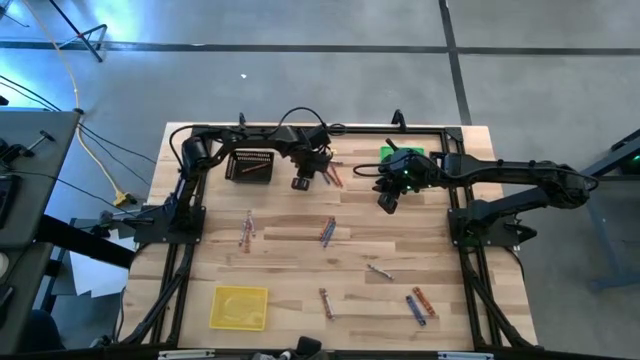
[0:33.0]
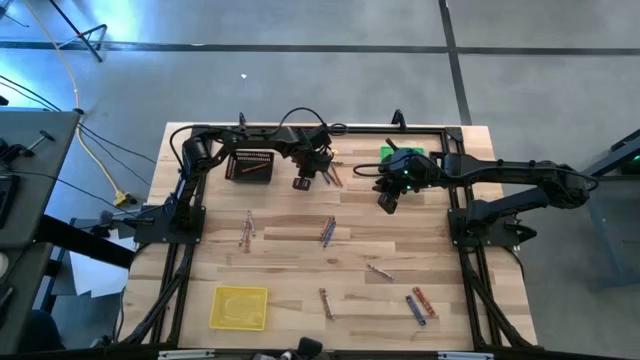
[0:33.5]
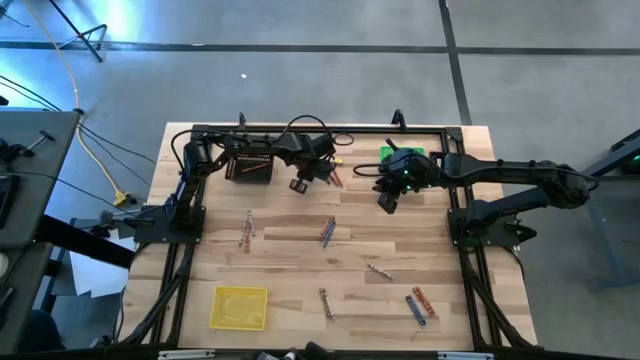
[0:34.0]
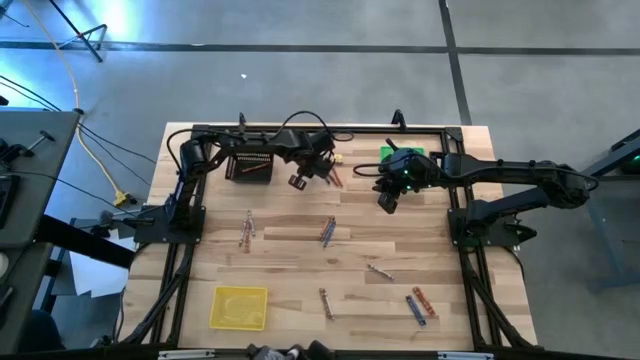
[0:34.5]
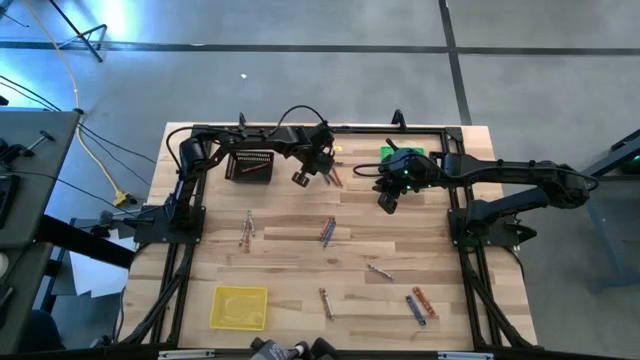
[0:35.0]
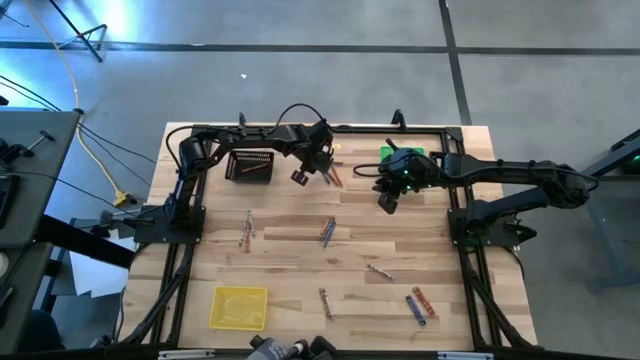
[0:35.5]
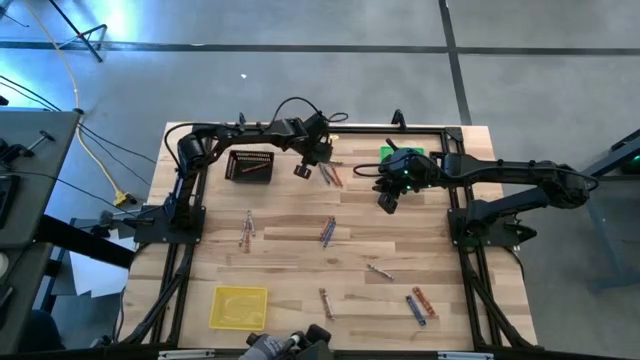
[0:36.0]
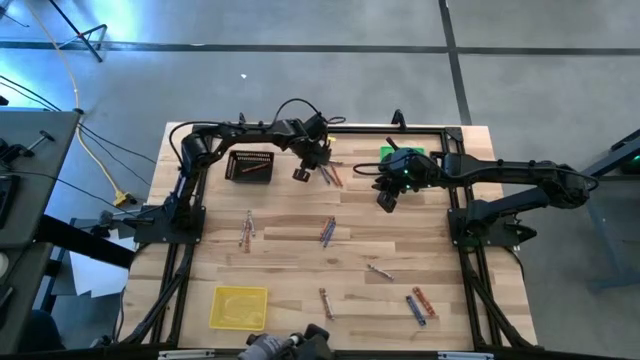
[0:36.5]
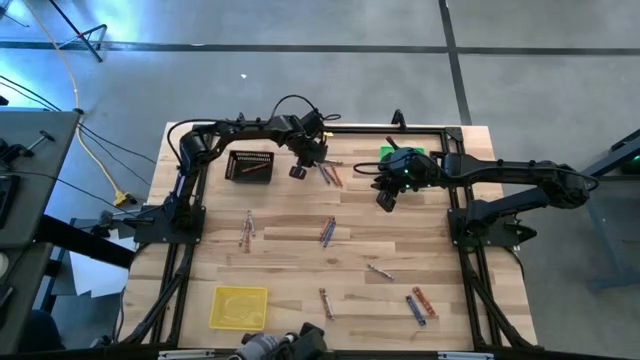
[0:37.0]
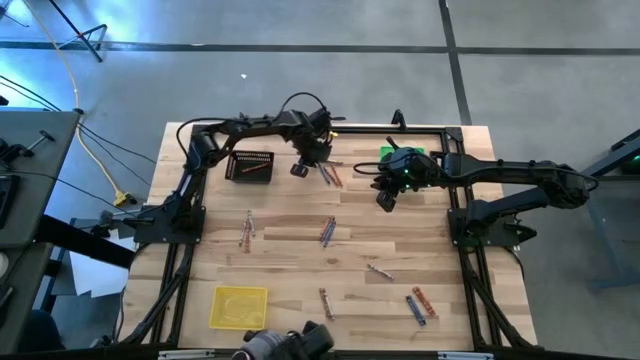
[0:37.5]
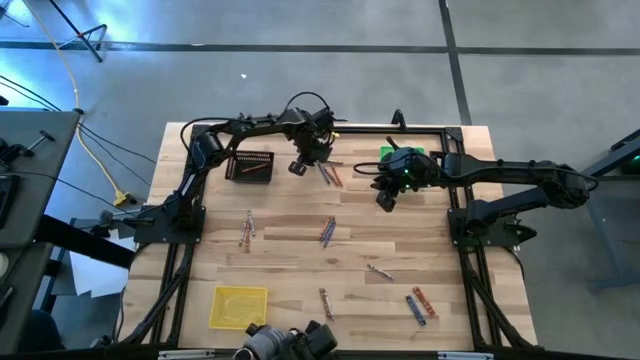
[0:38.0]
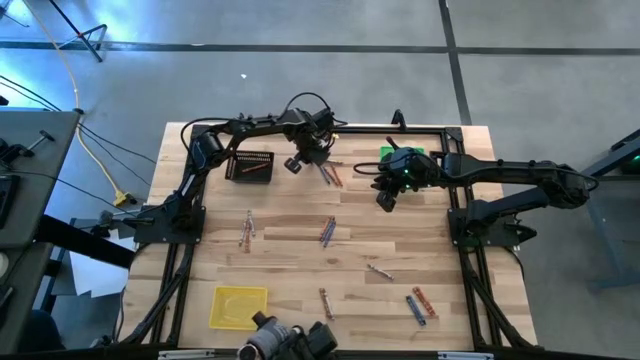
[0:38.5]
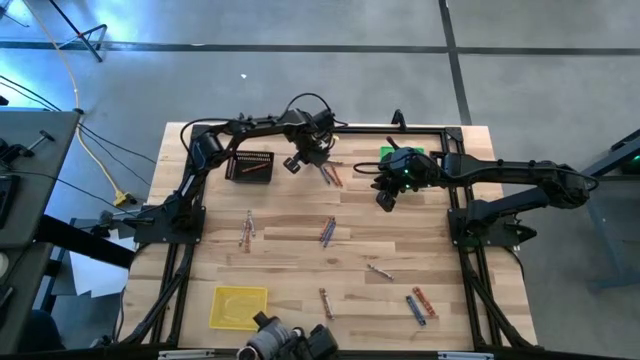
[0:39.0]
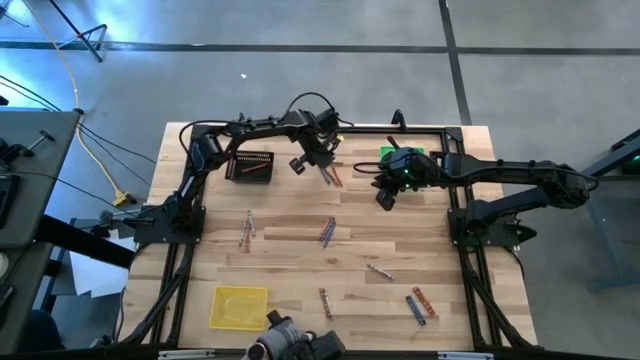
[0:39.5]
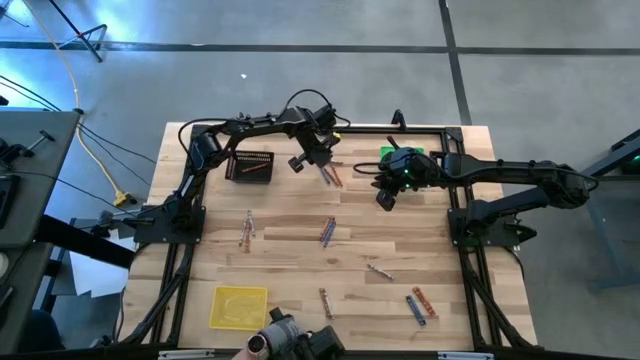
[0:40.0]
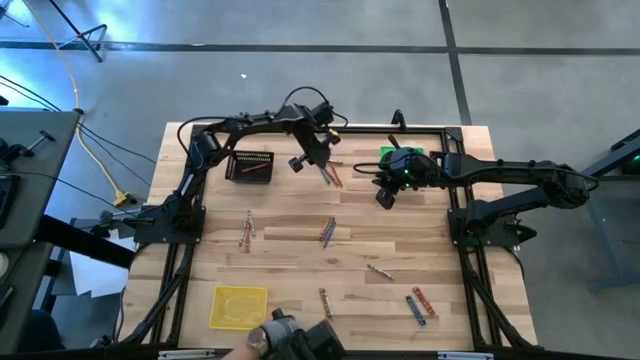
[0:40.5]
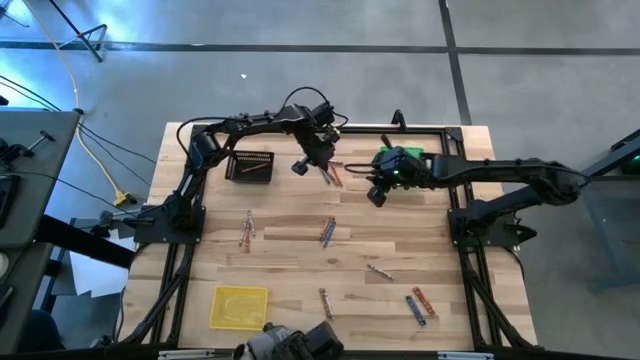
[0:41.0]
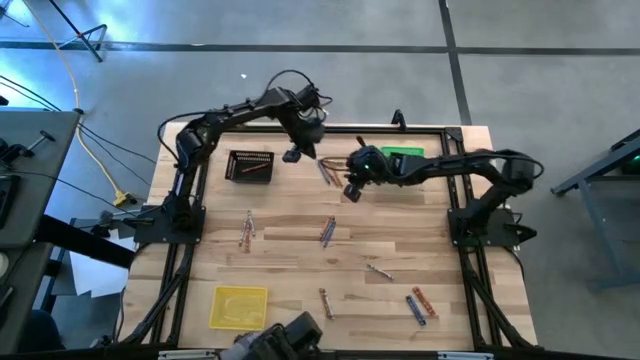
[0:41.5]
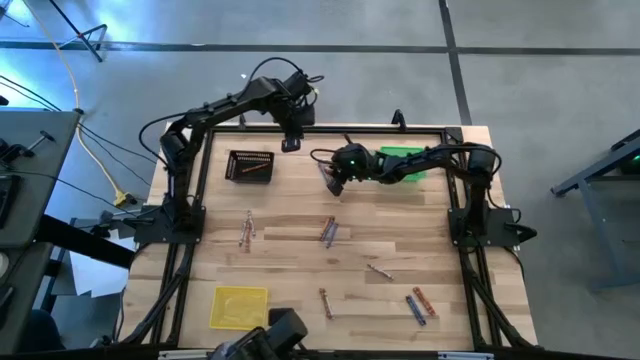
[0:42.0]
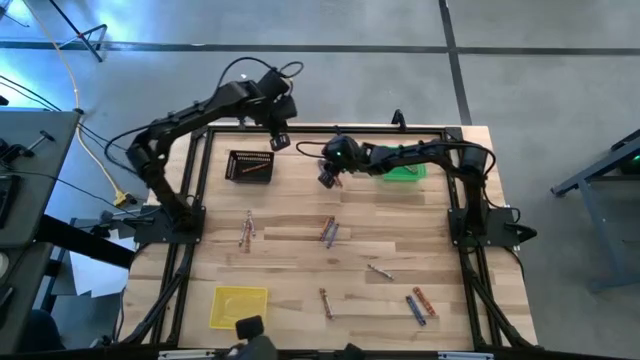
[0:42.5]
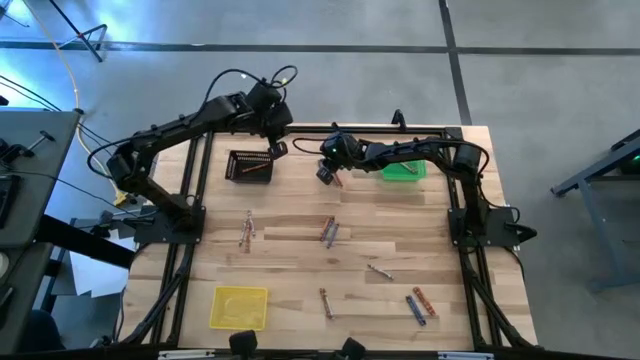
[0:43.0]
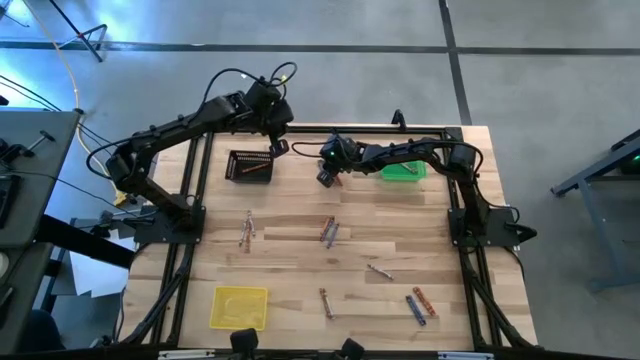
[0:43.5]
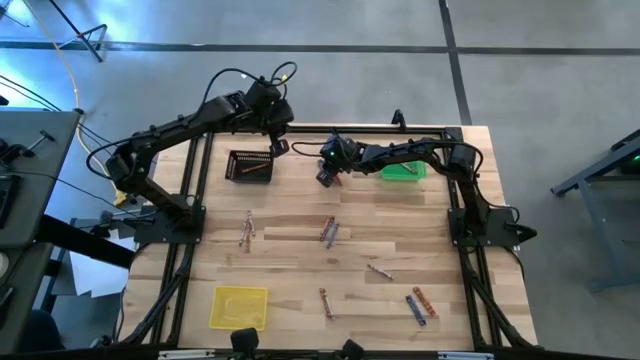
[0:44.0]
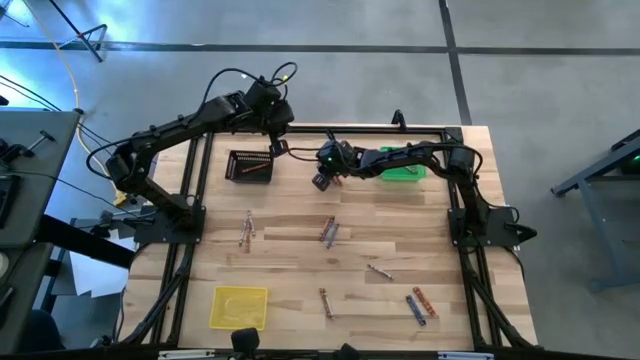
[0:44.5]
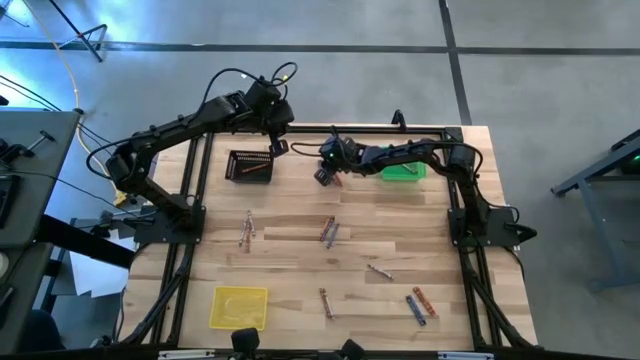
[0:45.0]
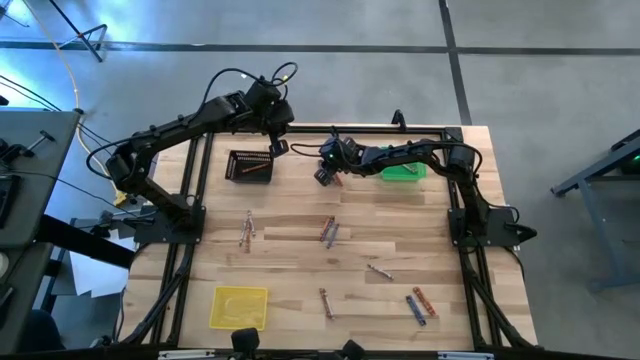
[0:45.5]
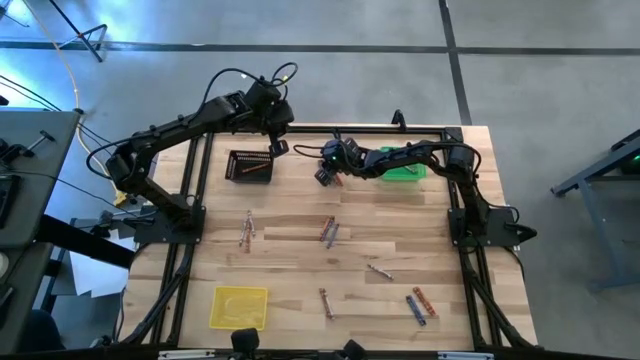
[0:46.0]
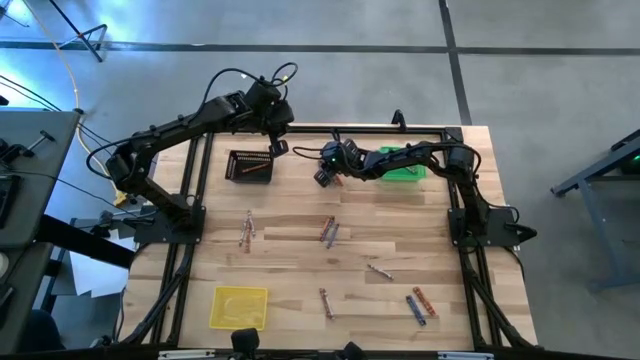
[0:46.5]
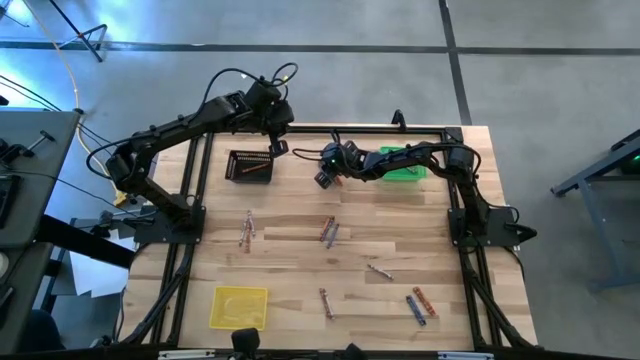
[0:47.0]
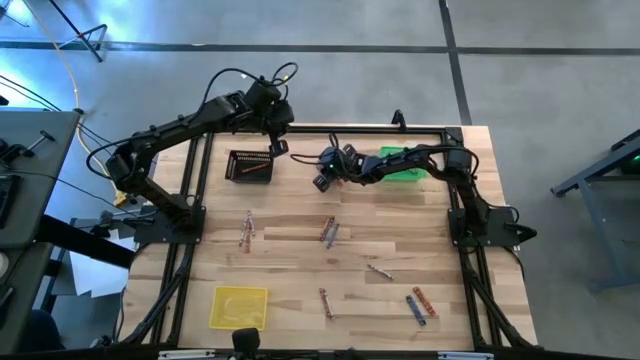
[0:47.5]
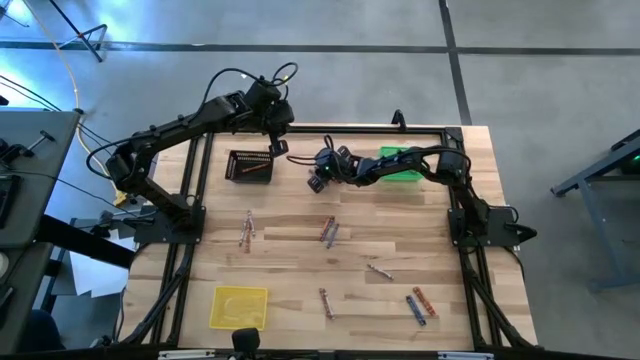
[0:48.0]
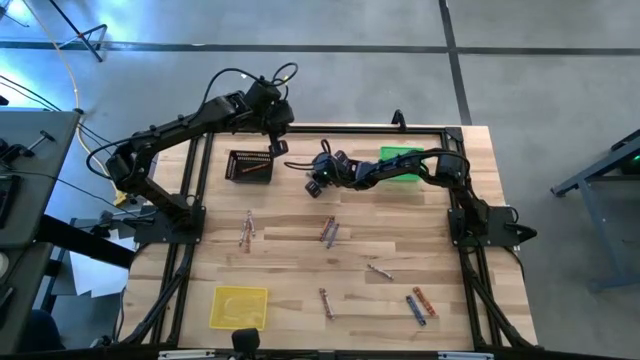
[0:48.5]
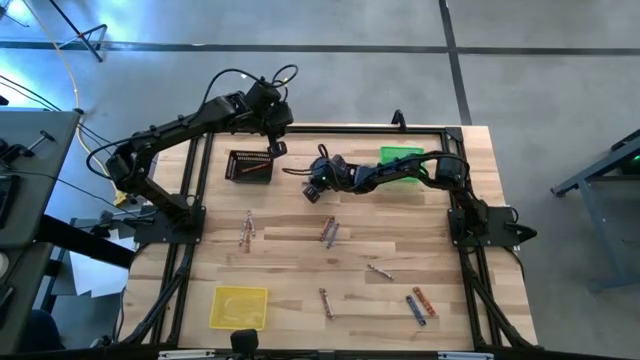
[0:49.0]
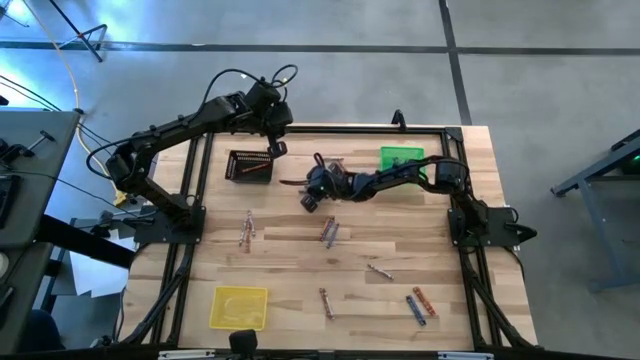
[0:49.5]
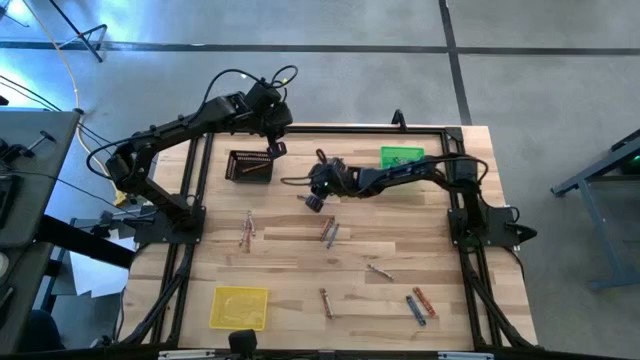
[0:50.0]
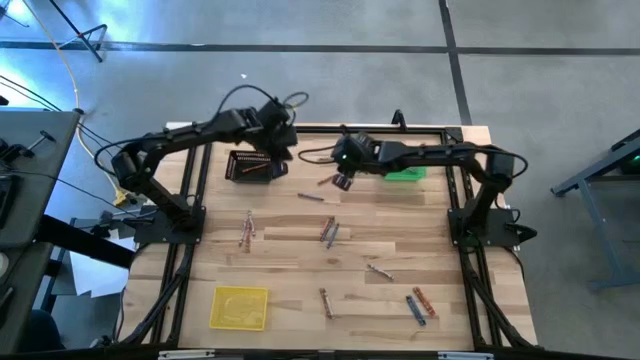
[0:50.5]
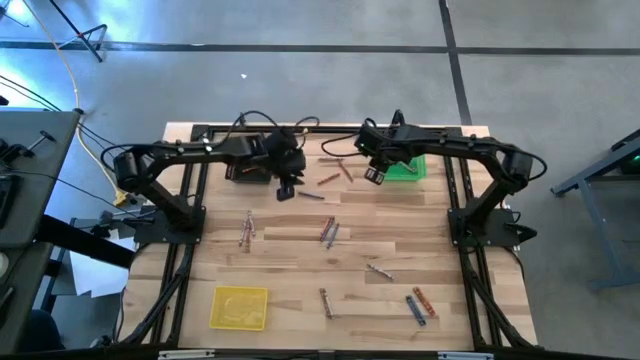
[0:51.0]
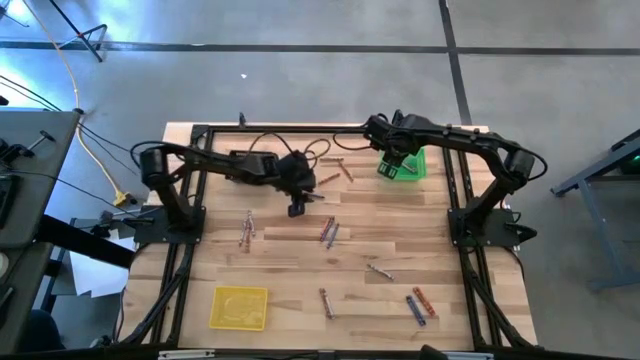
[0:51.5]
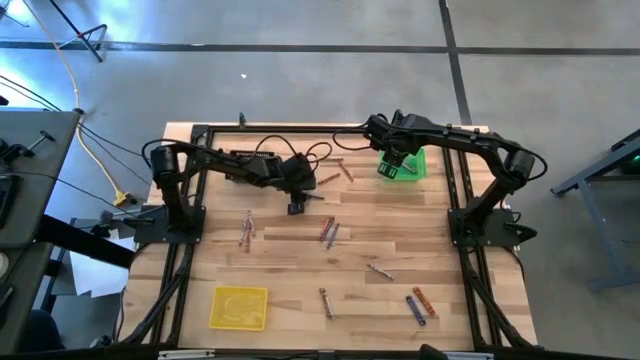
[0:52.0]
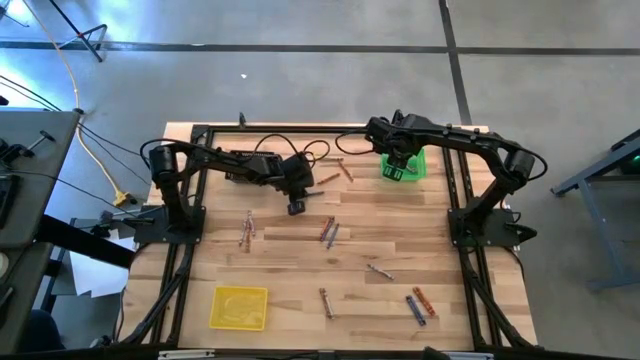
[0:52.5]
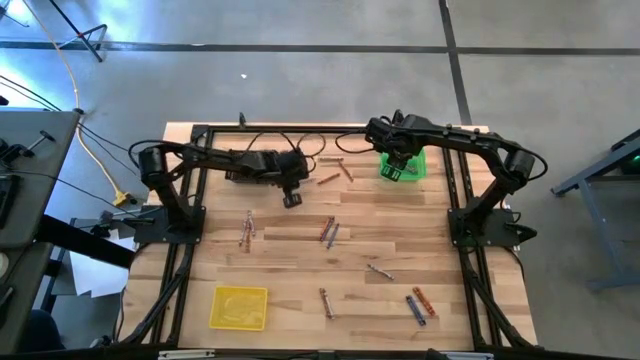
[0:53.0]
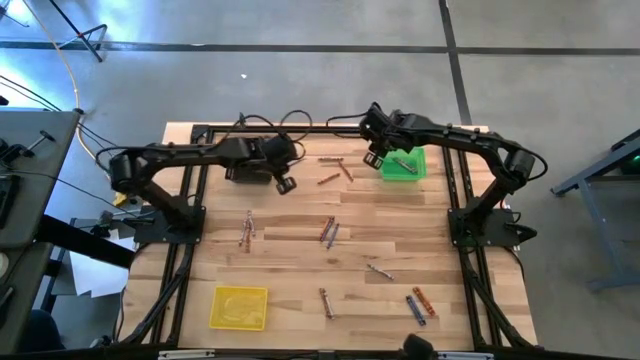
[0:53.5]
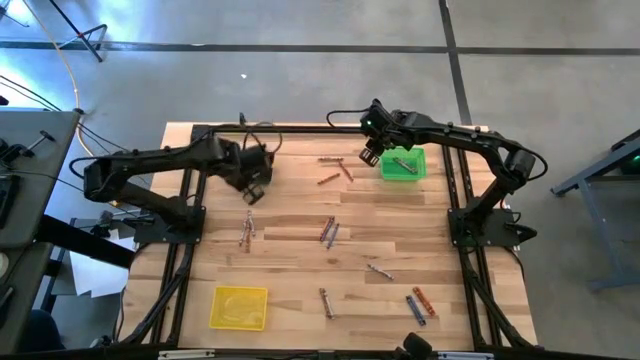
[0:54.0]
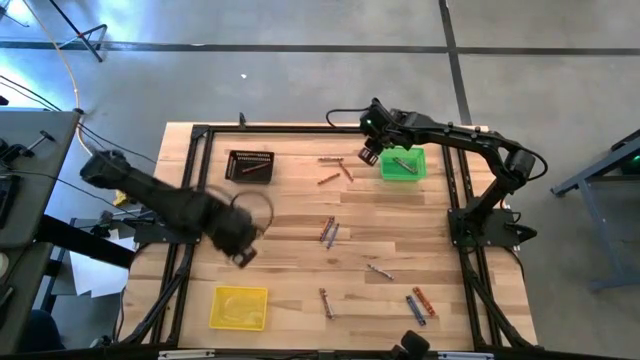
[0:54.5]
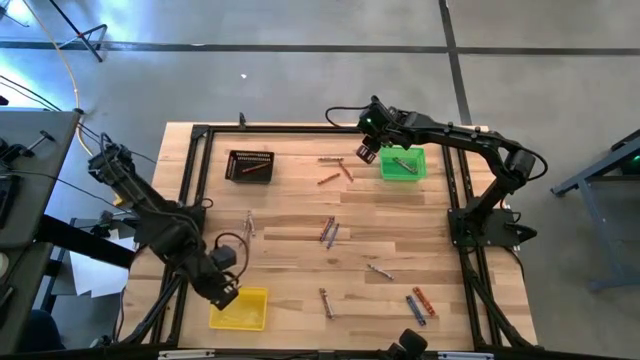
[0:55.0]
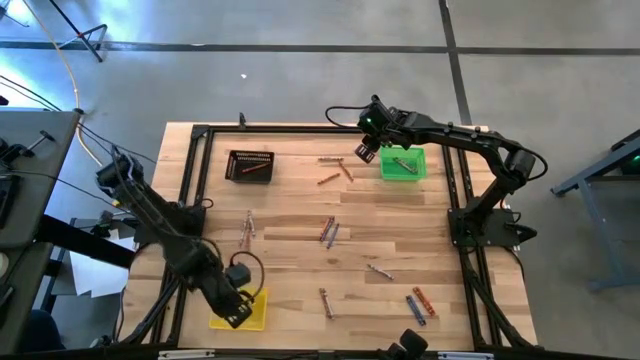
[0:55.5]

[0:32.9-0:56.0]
Task: Sort crayons
Put the blue crayon into the yellow bin
